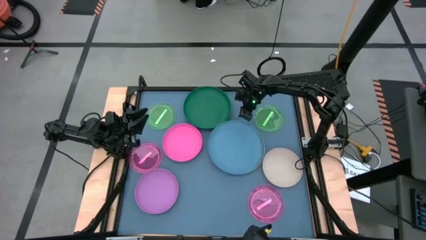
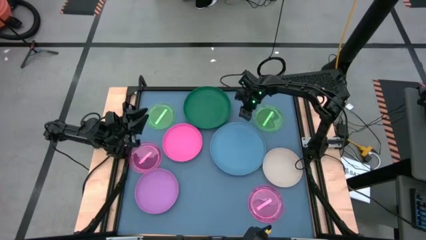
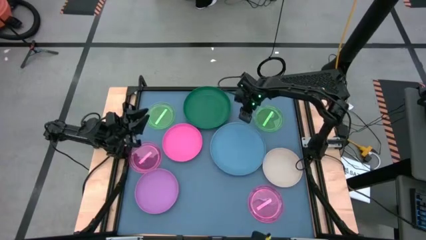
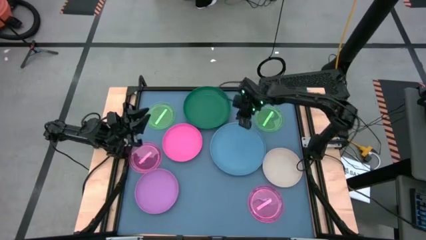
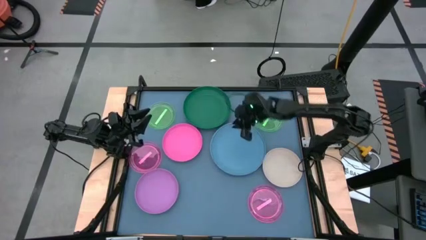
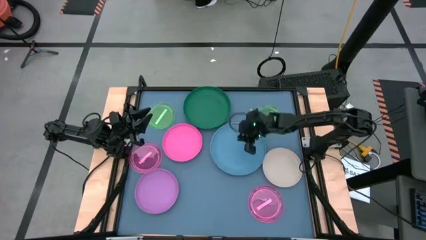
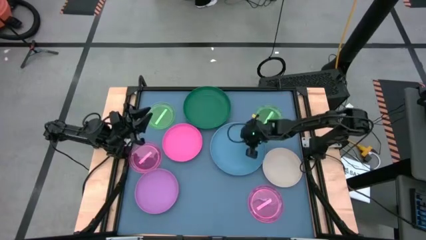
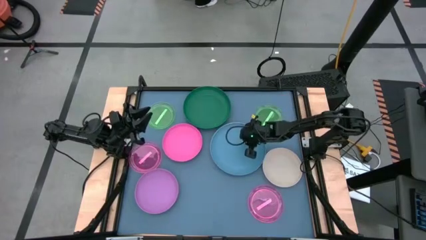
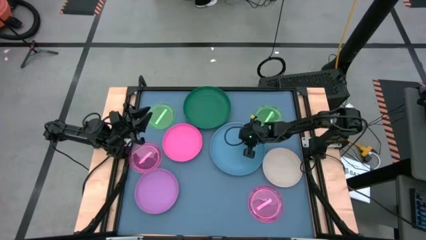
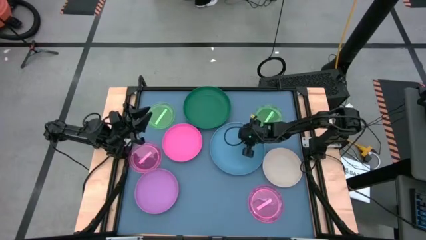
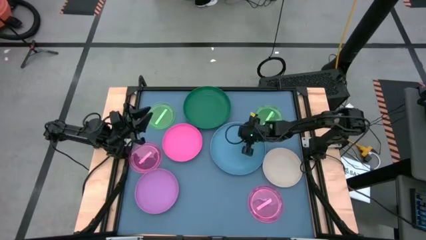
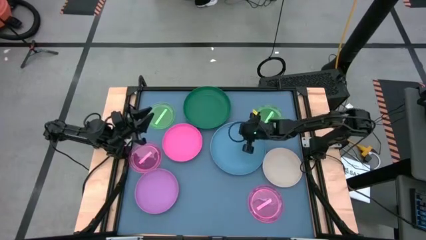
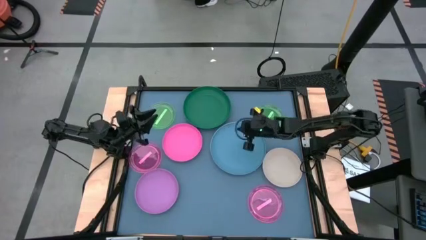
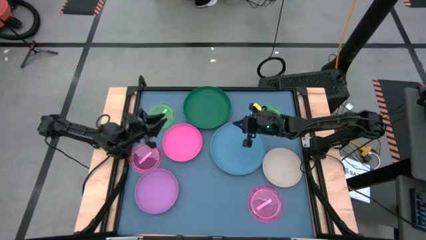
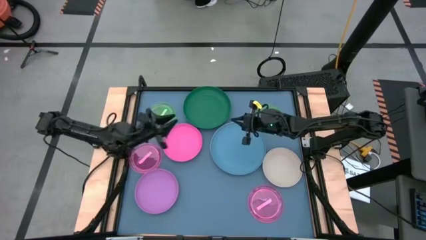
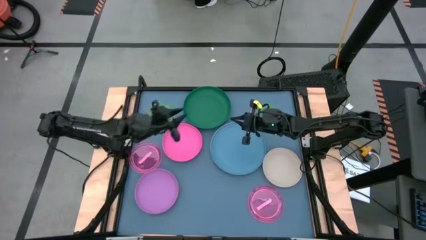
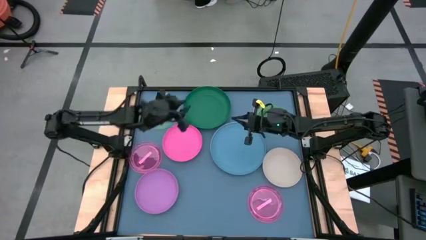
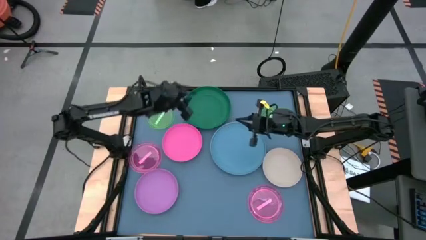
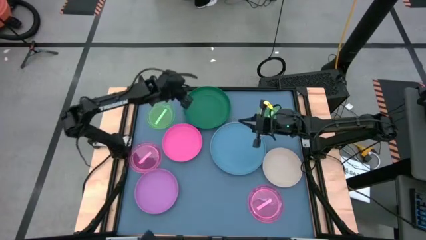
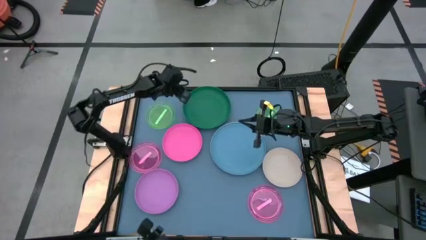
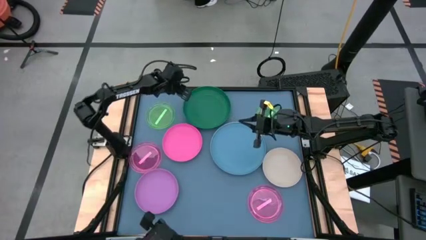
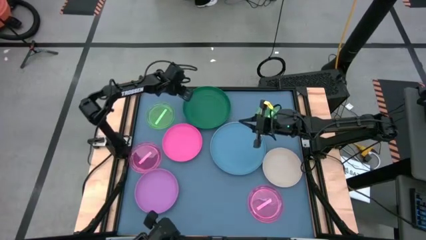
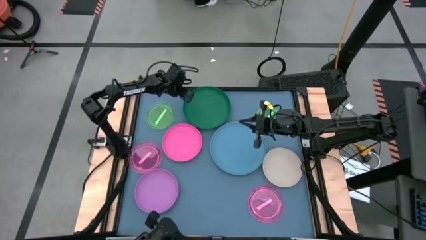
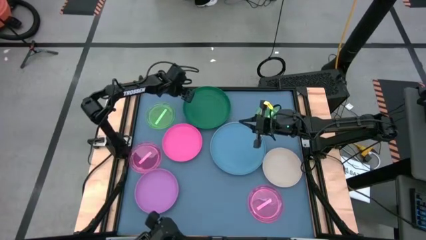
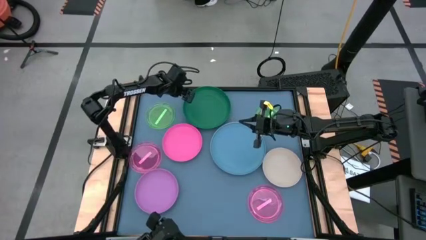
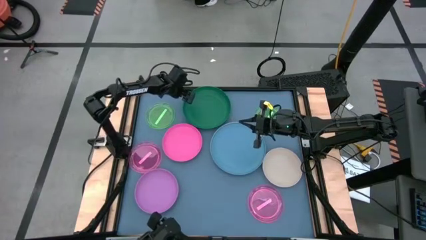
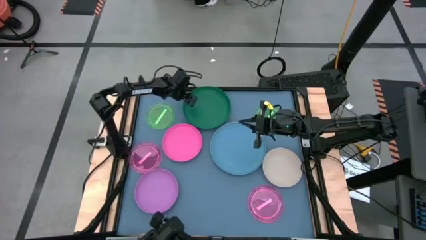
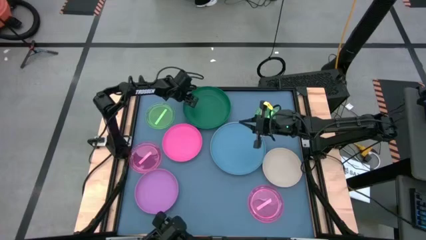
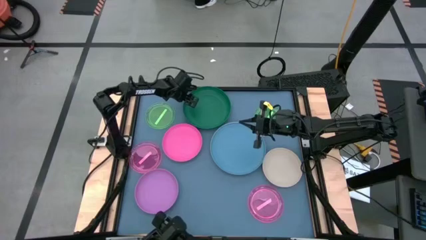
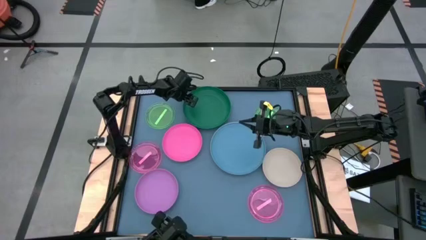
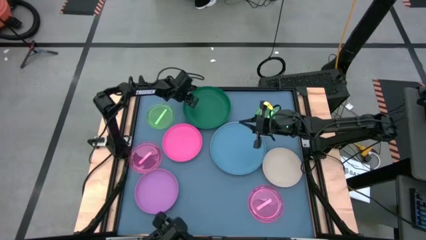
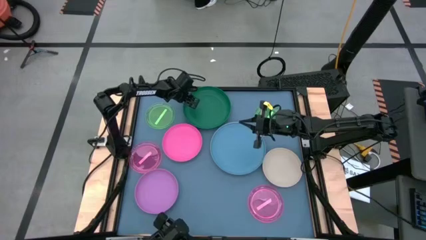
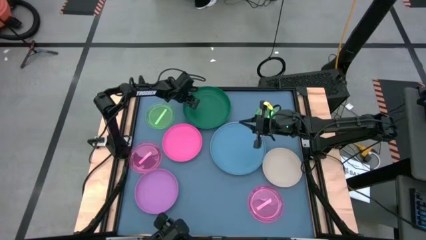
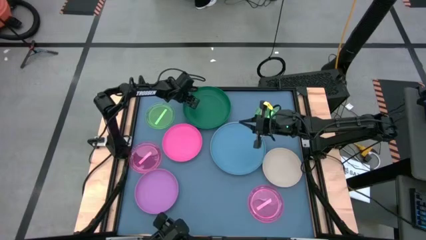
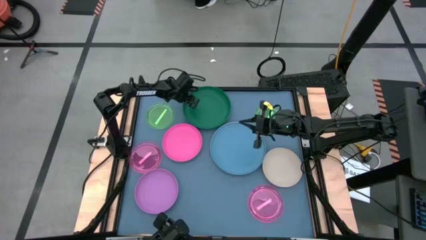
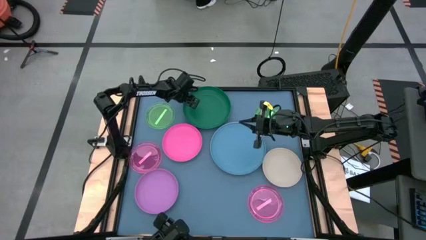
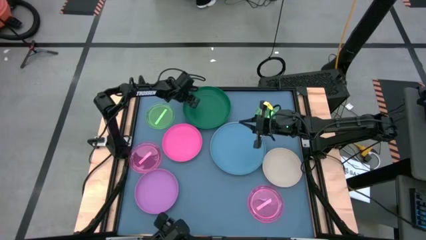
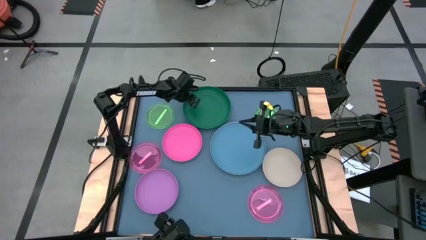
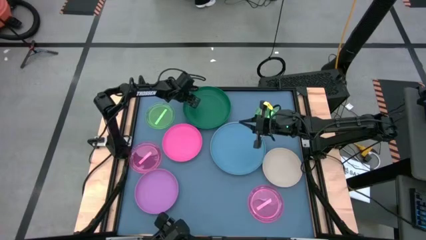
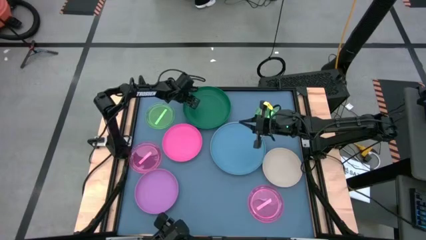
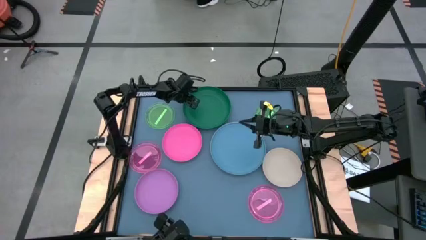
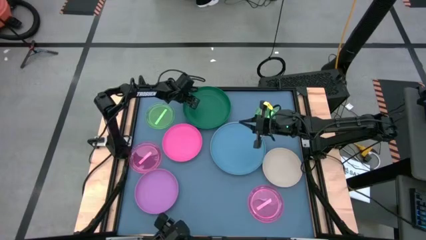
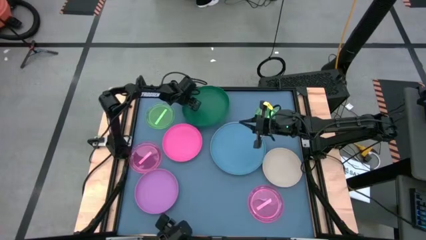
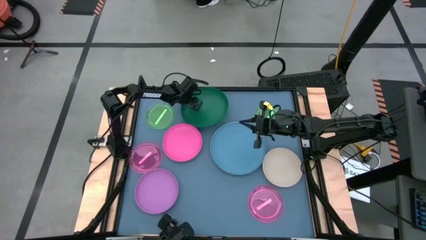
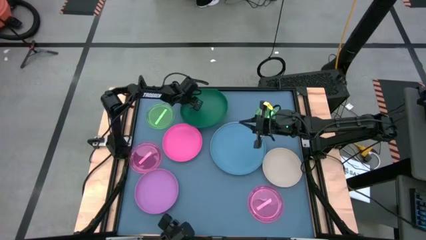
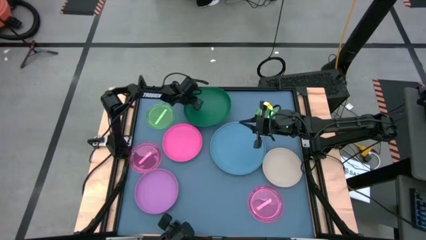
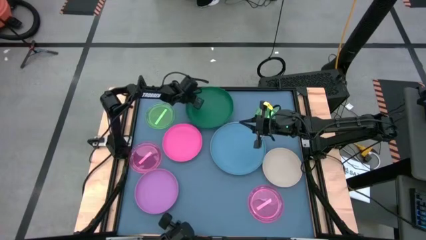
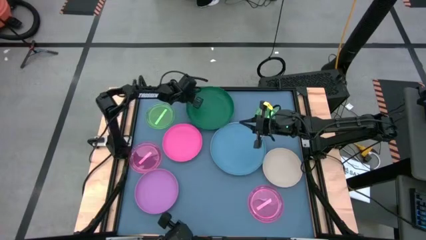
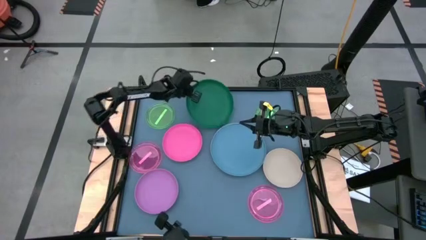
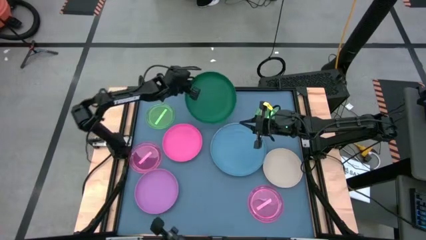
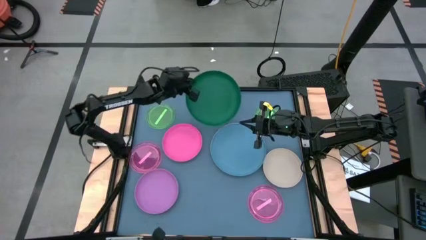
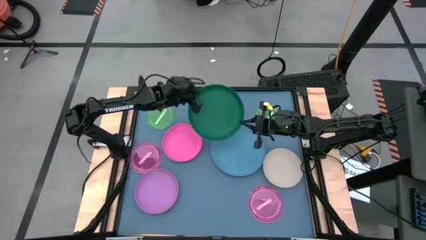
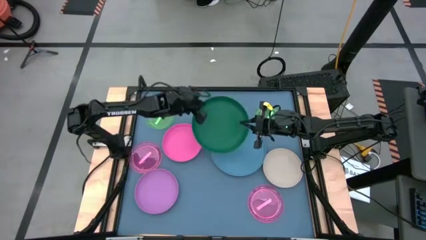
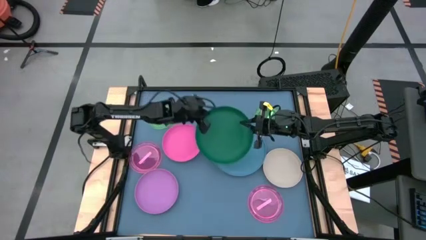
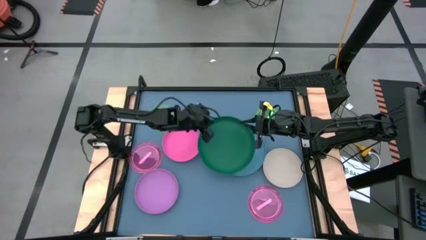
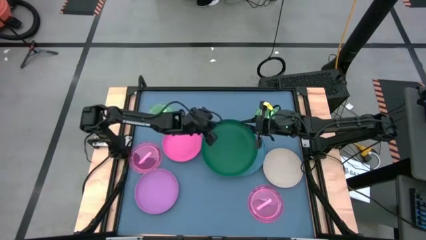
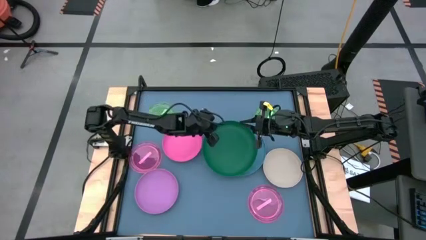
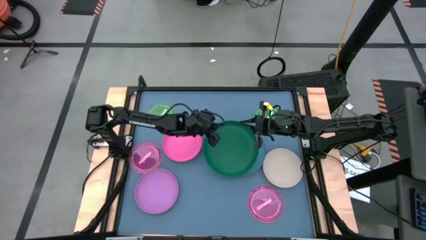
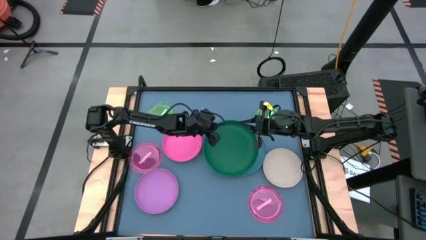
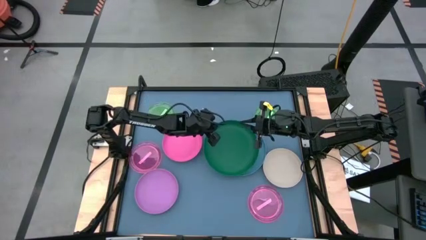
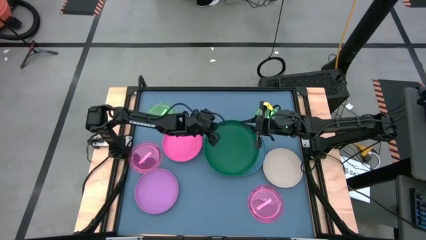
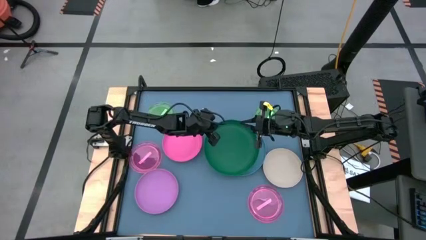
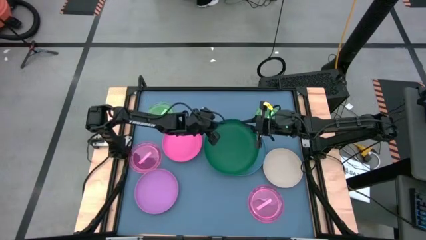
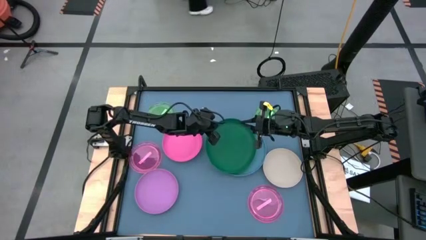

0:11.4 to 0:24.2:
Task: Stack plastic plates
Stack the green plate on top of the blue plate

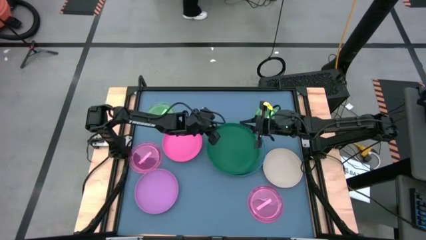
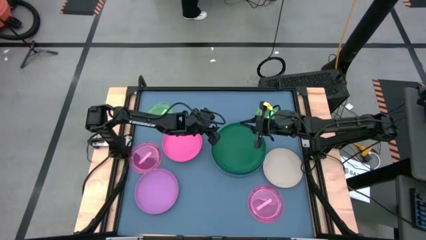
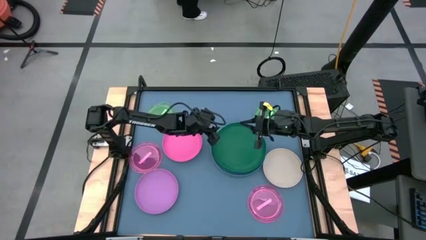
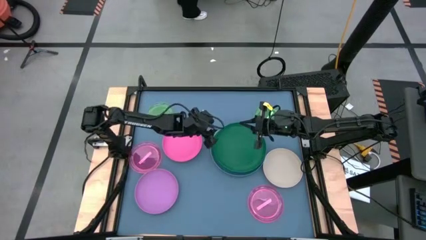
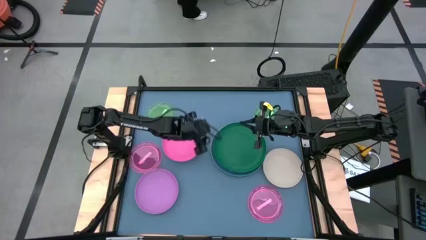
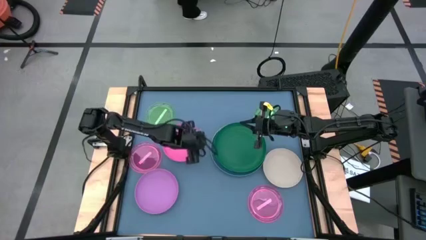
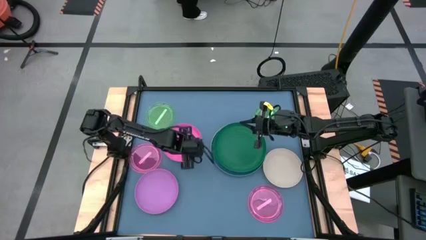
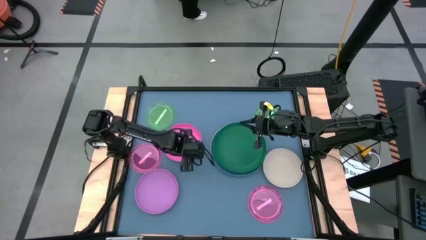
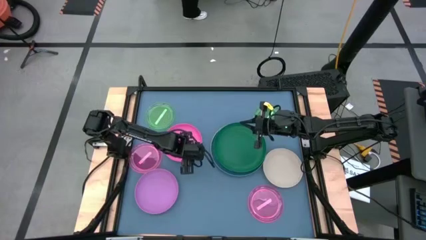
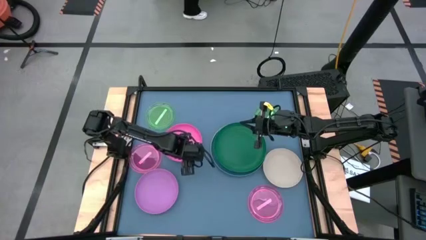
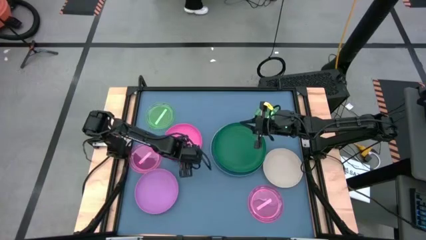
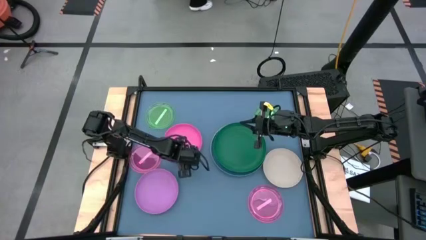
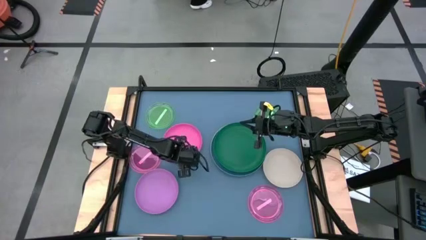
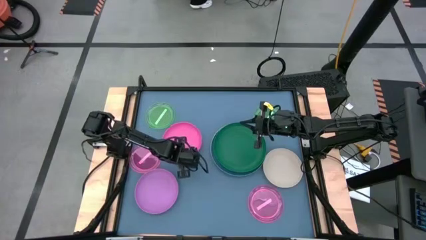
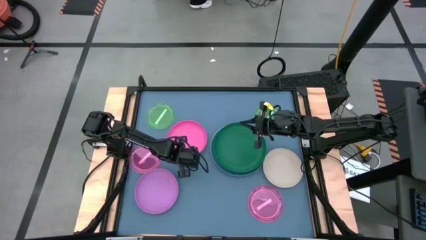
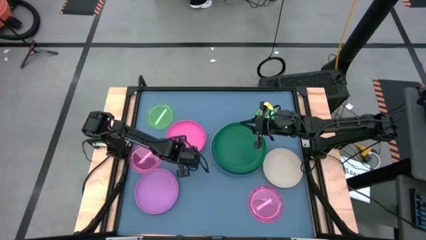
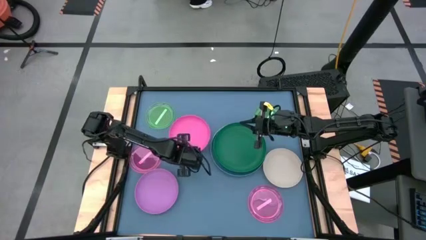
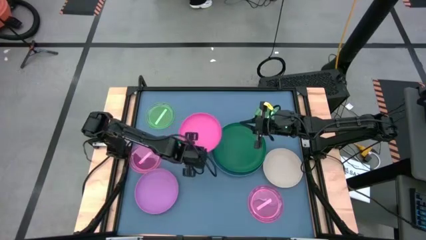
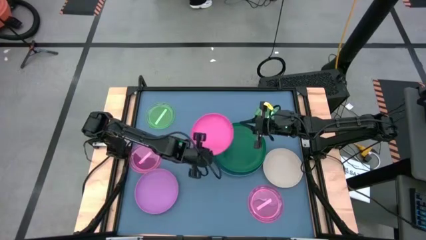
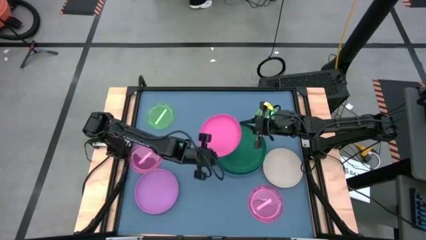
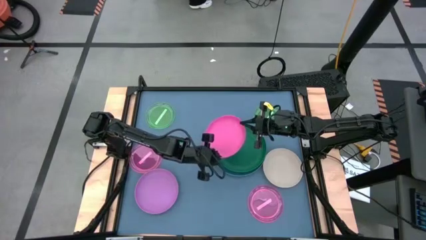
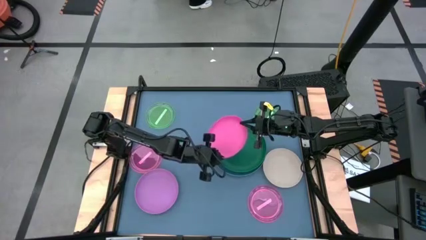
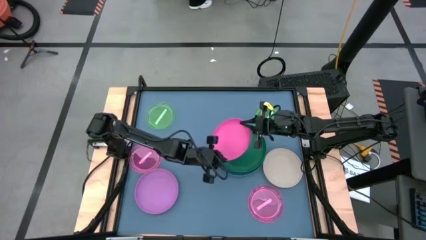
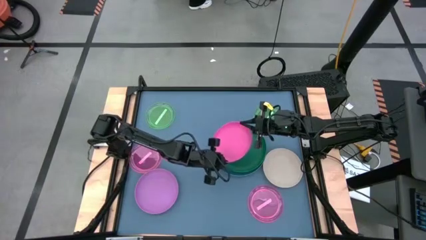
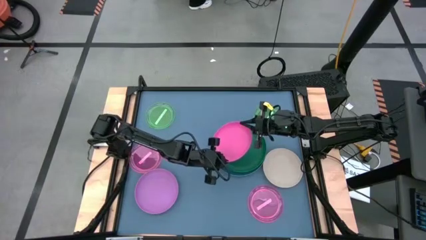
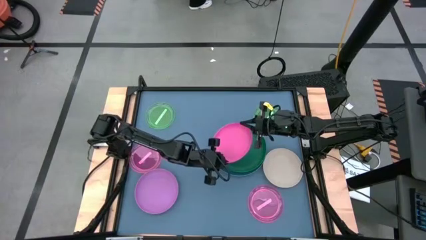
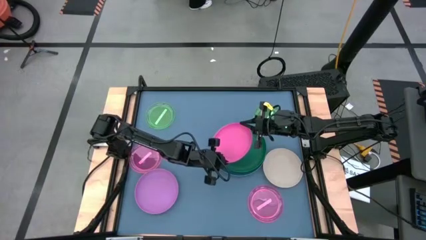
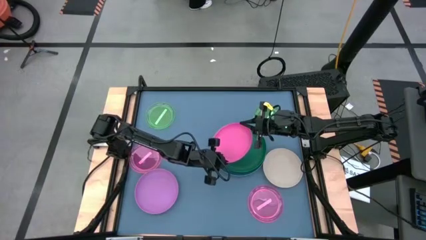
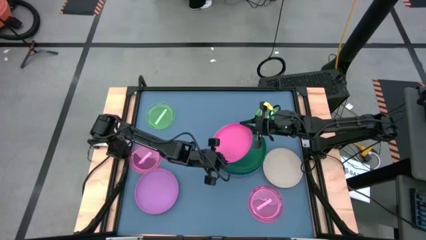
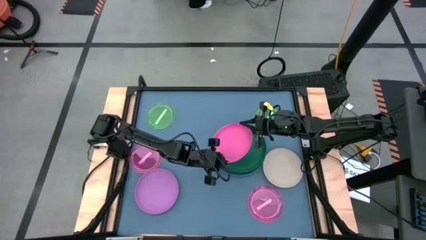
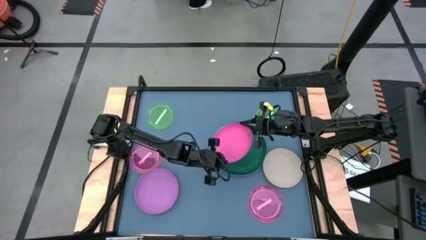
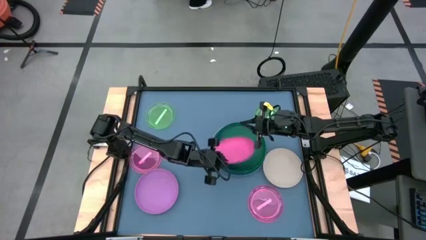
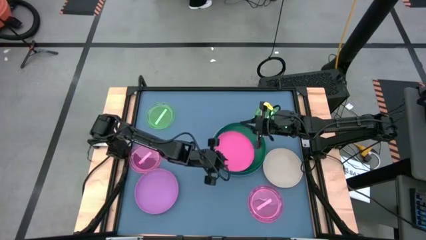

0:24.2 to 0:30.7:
Stack the pink plate on top of the green plate
